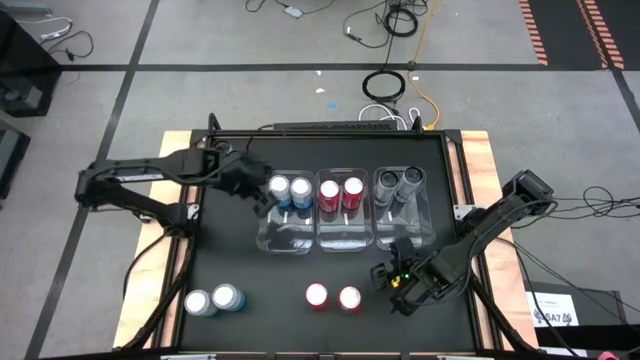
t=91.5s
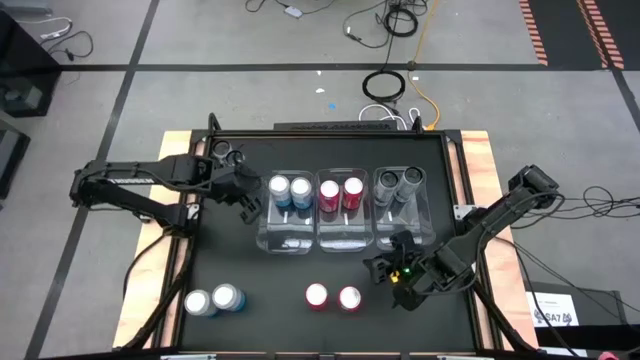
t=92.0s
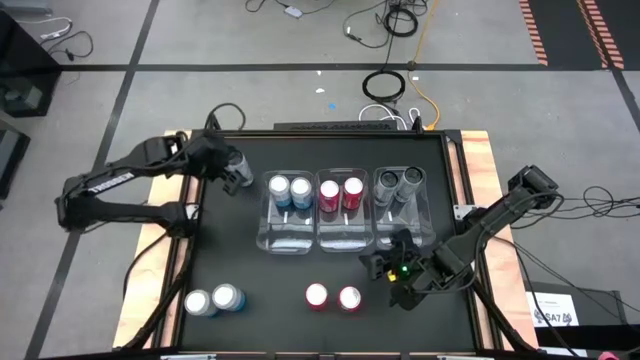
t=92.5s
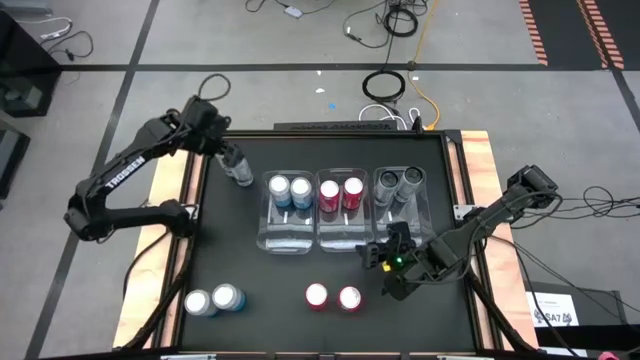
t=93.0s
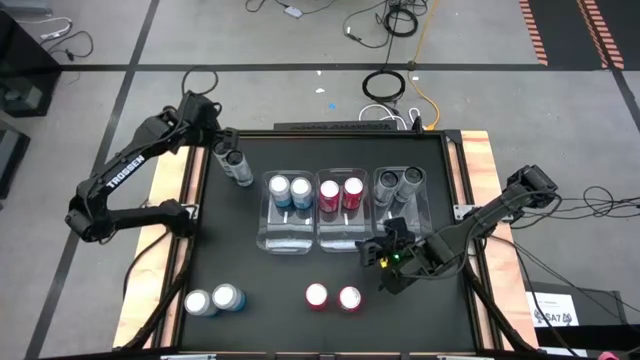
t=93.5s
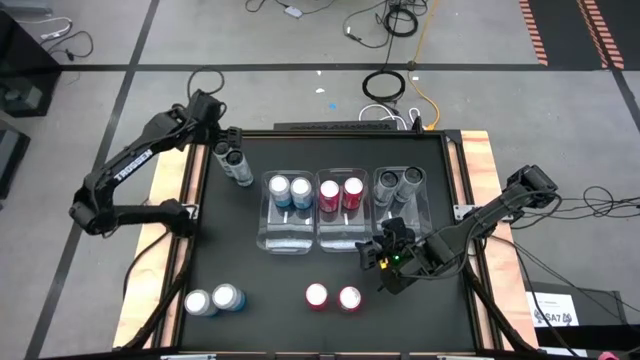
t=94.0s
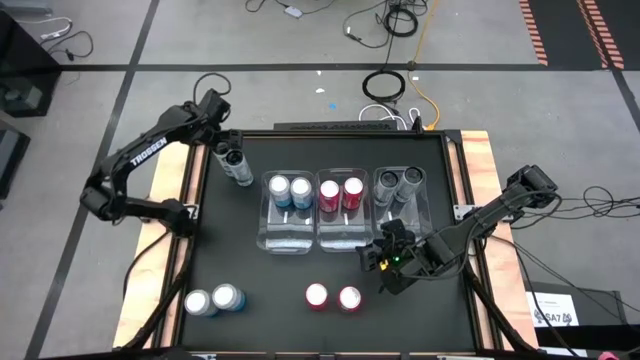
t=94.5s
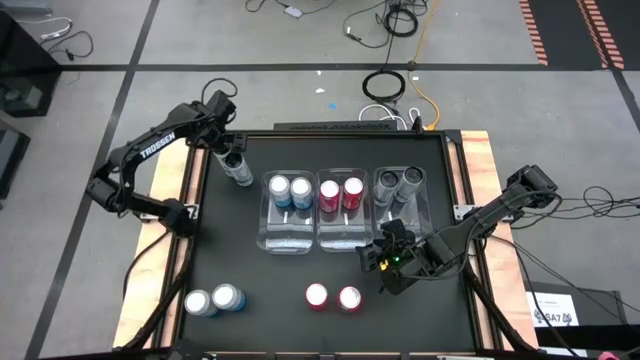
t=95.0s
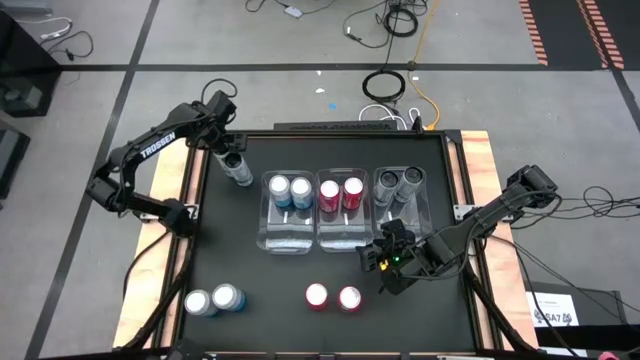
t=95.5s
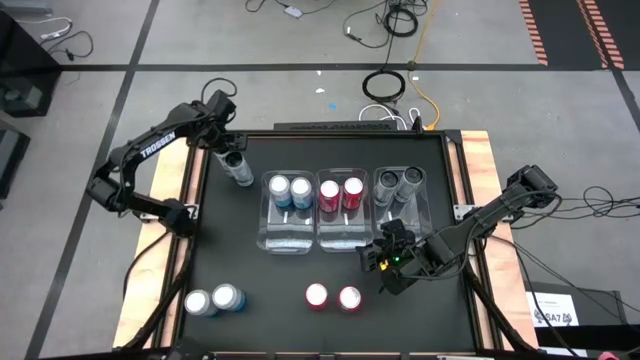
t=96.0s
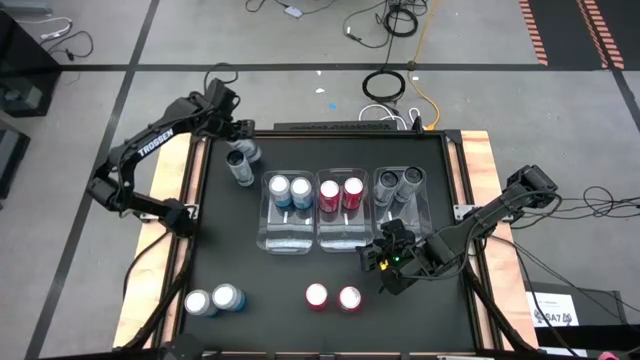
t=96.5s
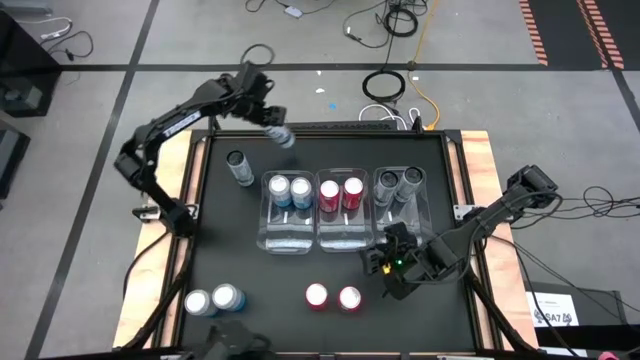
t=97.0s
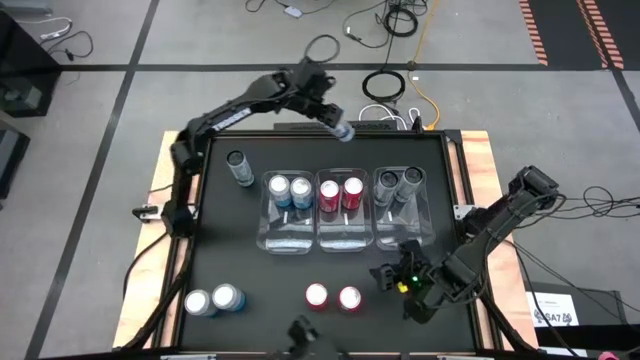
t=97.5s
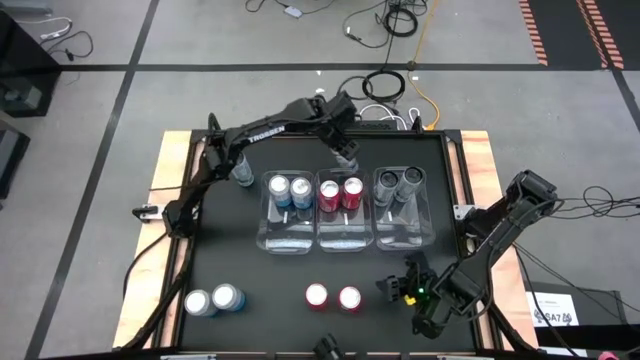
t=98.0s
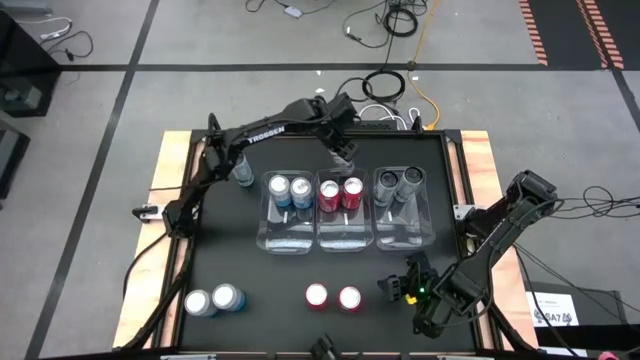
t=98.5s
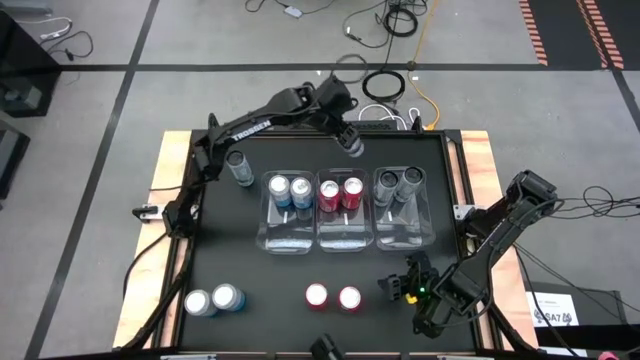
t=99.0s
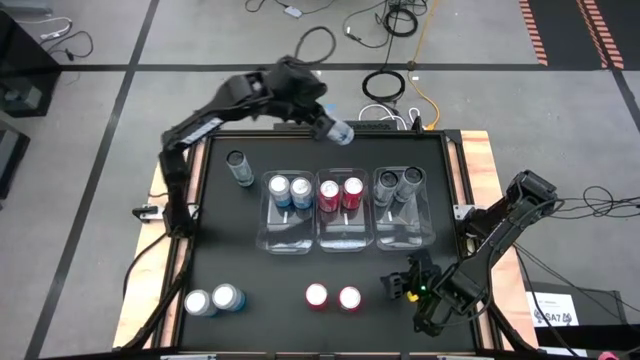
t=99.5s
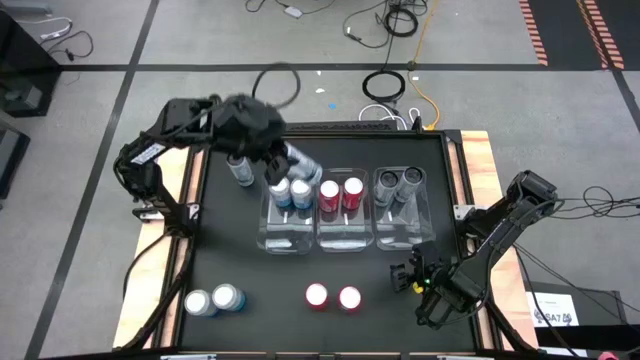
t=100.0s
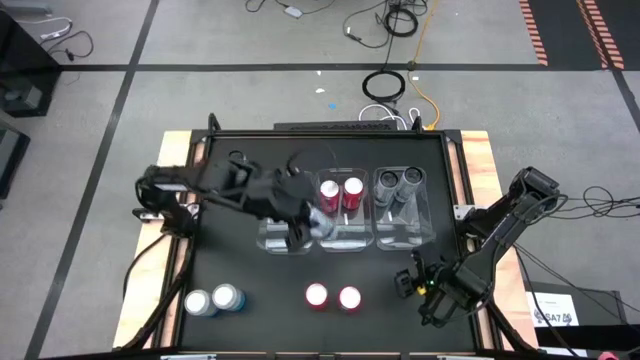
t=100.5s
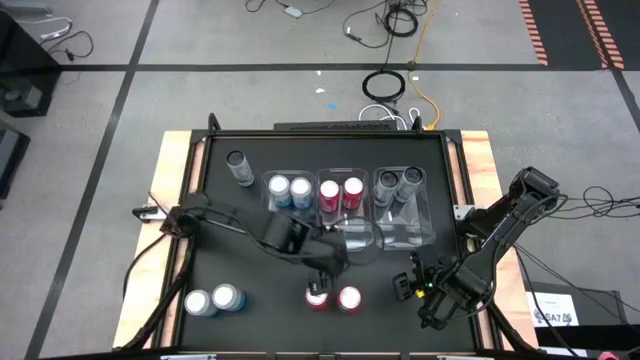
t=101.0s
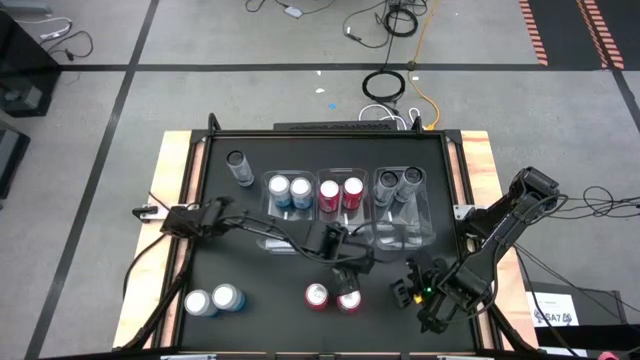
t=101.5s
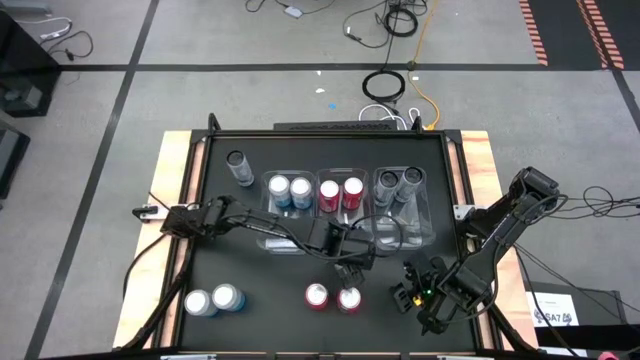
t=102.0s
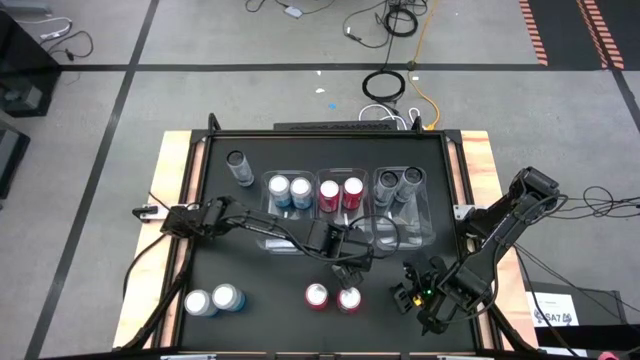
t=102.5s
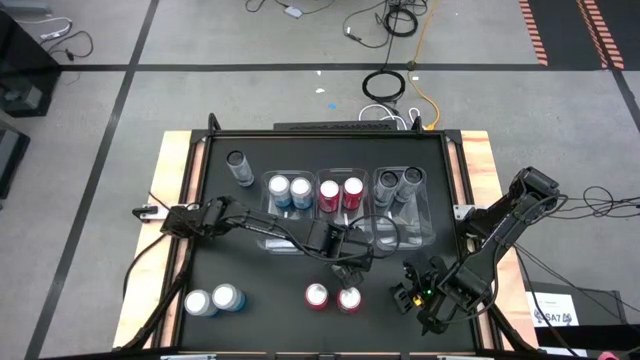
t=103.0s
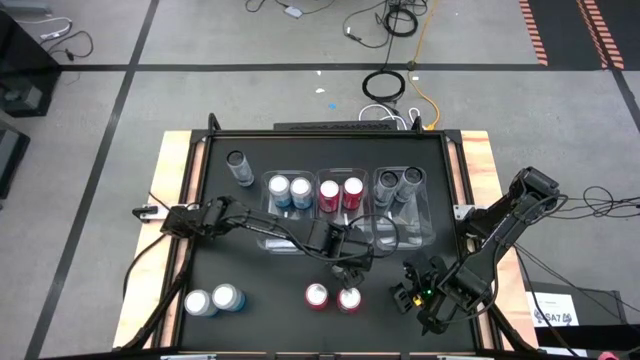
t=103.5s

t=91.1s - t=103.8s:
Task: Sort soda cans
Put the white-blue soda can into the right transparent bin

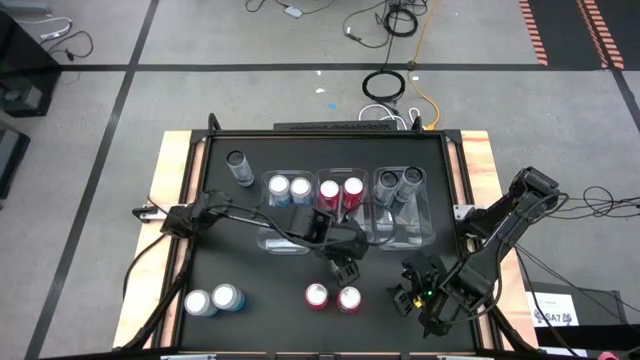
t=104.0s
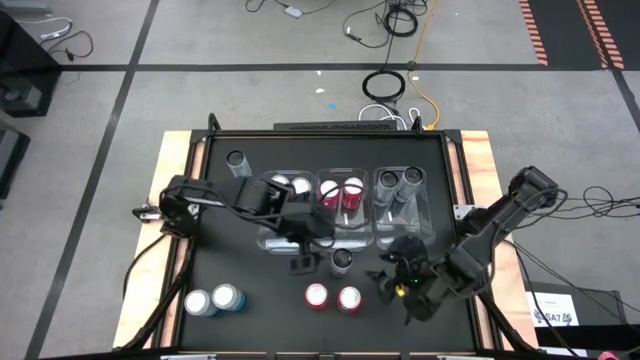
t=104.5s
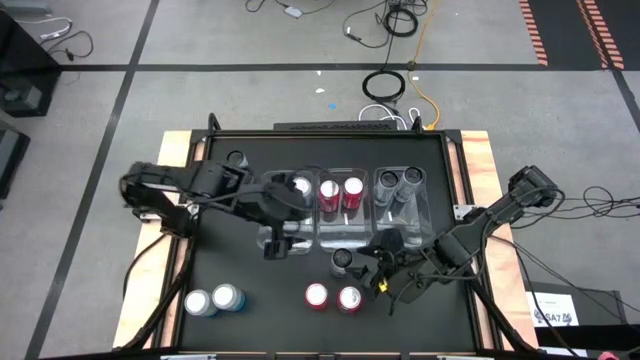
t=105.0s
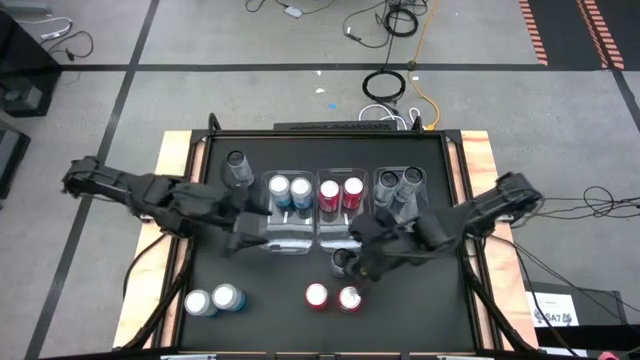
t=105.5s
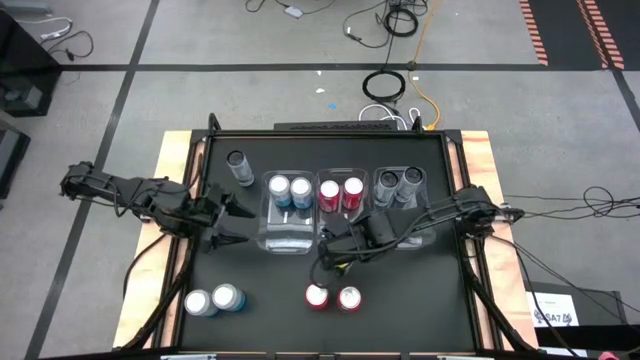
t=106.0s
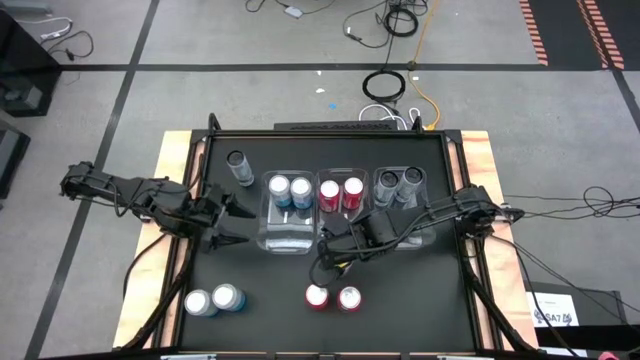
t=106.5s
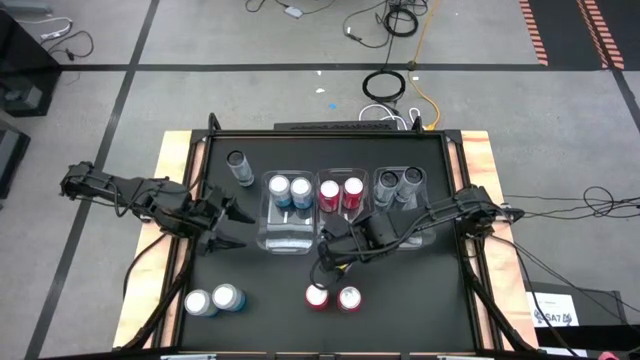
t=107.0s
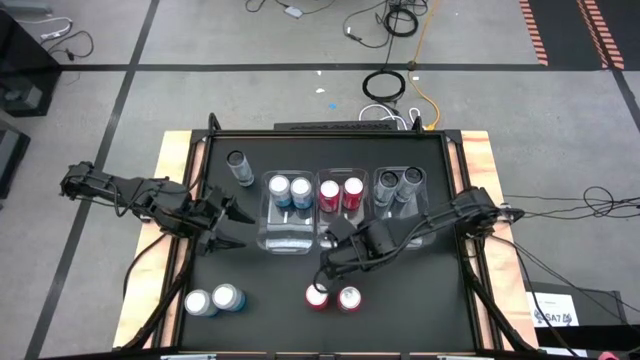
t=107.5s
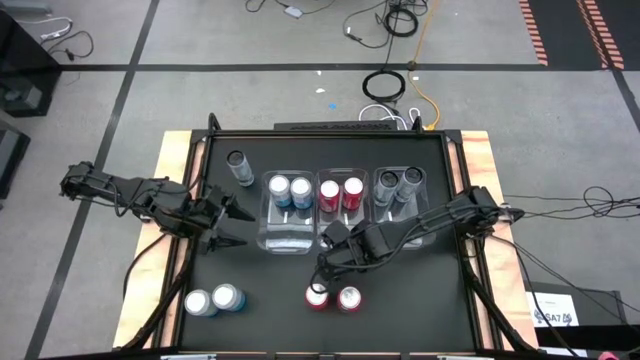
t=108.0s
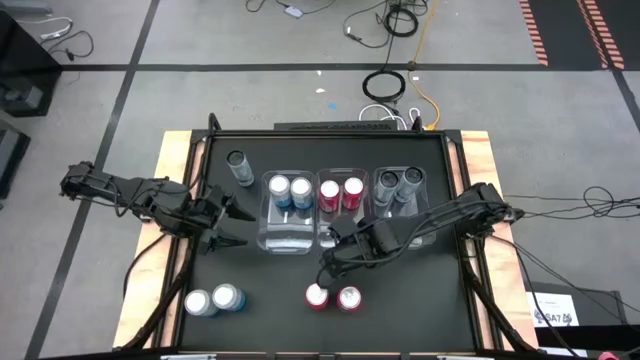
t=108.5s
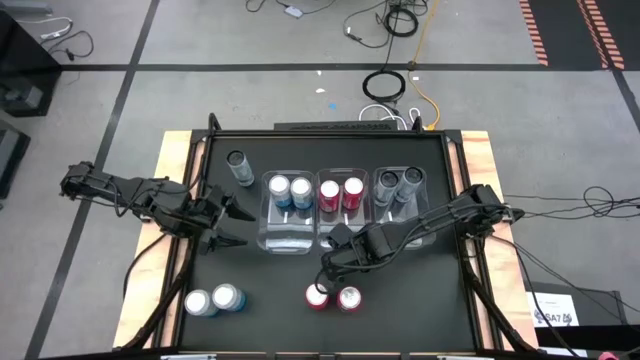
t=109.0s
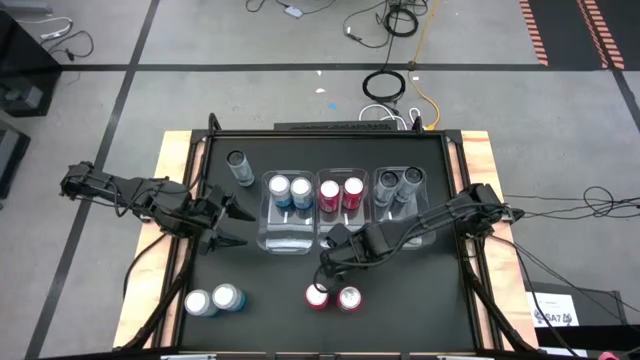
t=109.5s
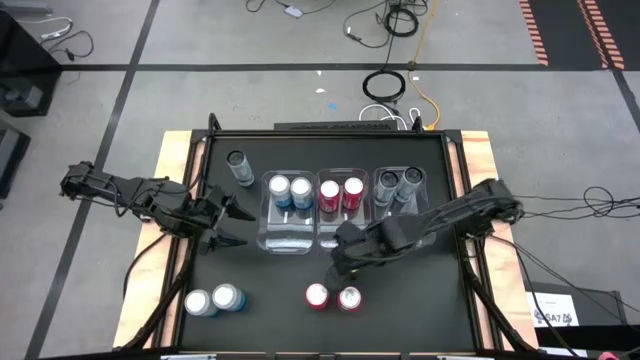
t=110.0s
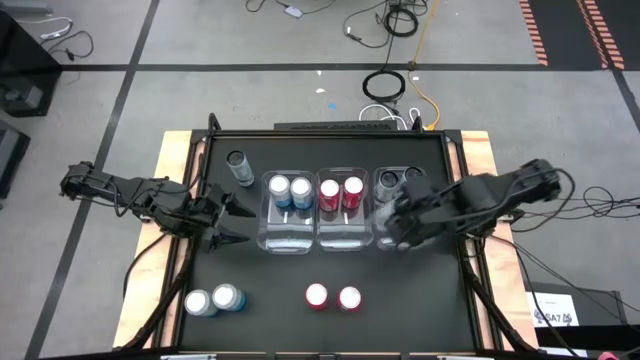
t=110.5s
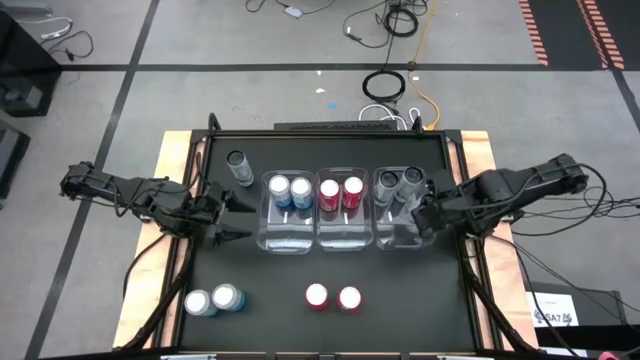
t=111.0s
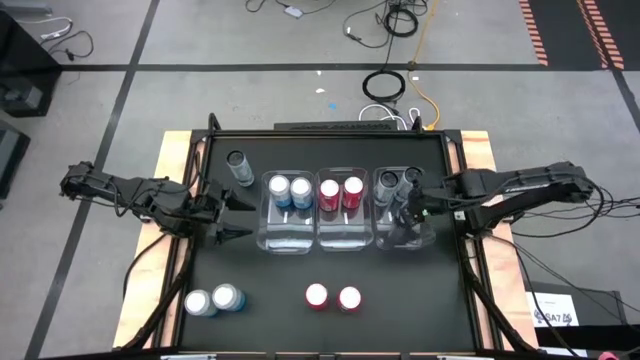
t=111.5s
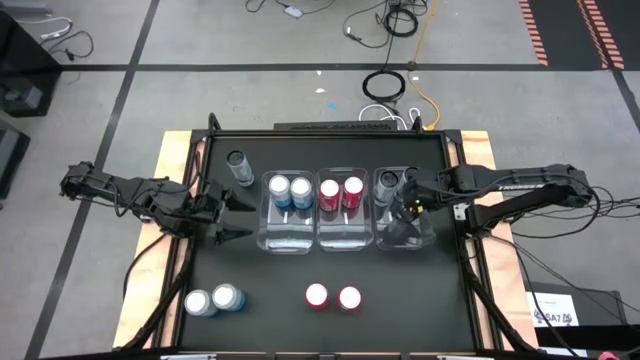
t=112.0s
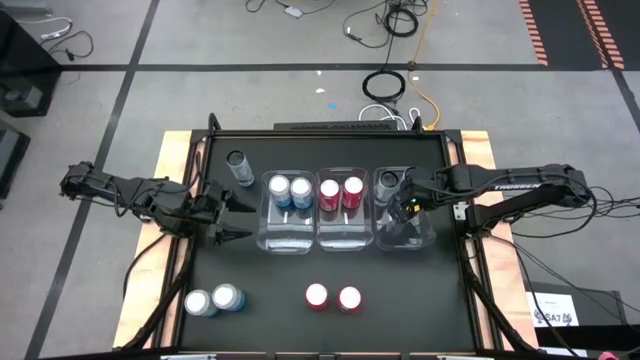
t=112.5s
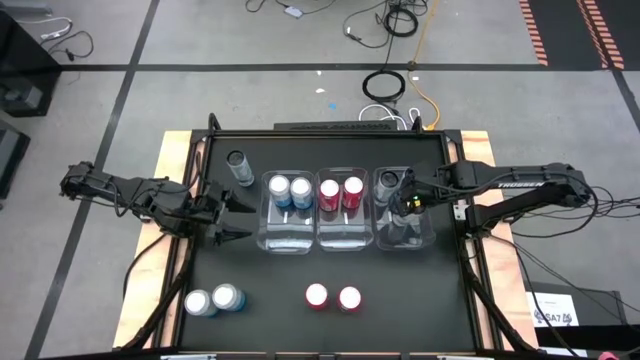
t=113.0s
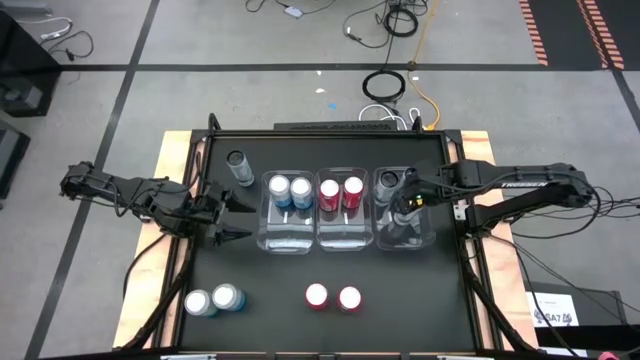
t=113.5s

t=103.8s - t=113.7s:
Put the white-blue soda can into the right transparent bin

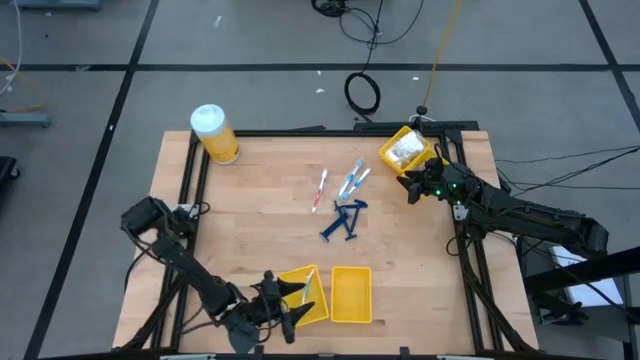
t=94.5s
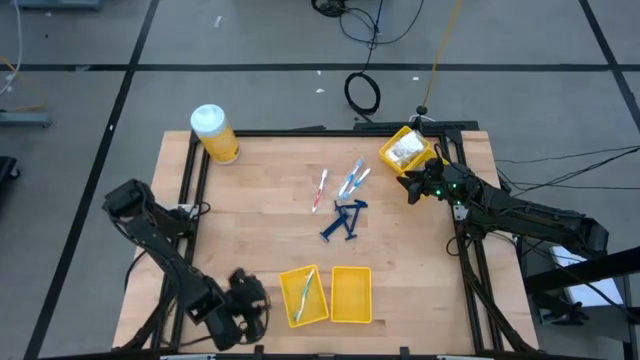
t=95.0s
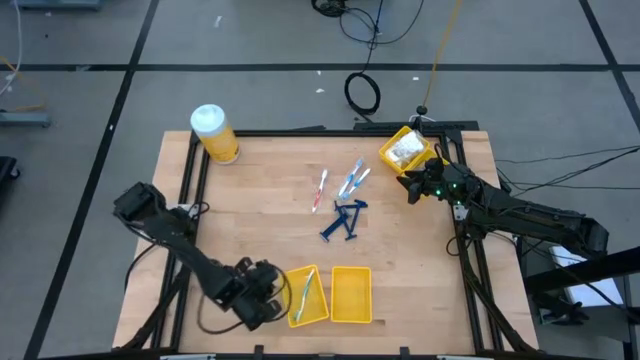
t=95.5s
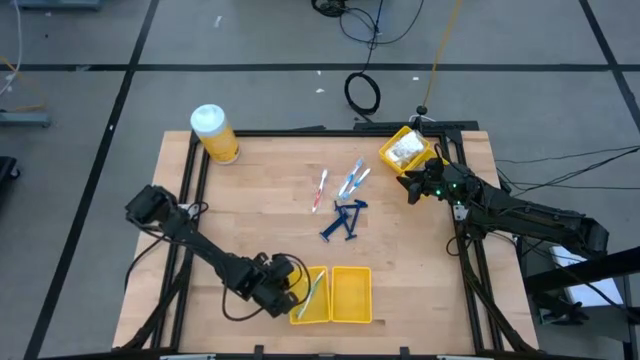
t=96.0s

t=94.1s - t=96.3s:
Task: Pick & Place Travel size toiletries
Adjust the bottom left yellow bin
